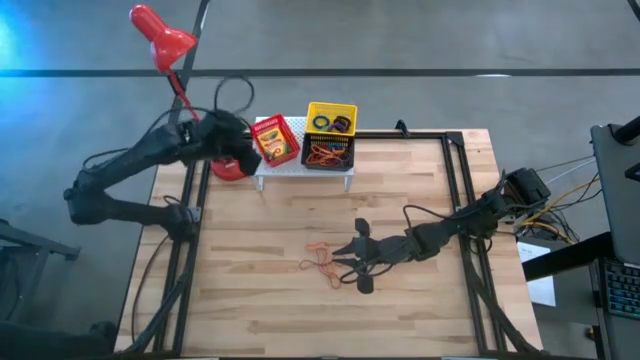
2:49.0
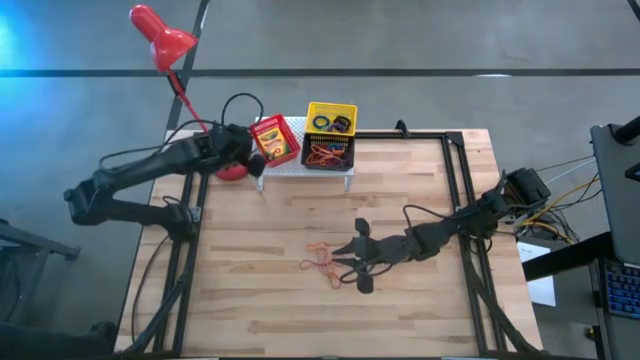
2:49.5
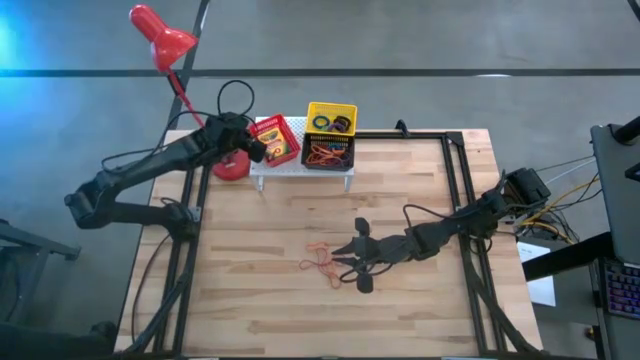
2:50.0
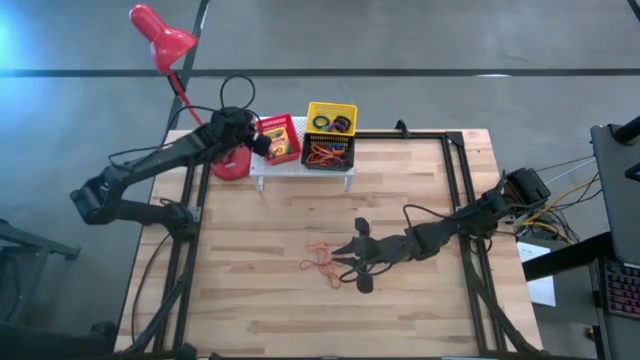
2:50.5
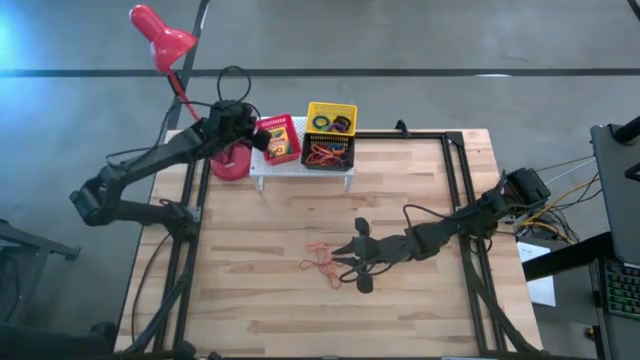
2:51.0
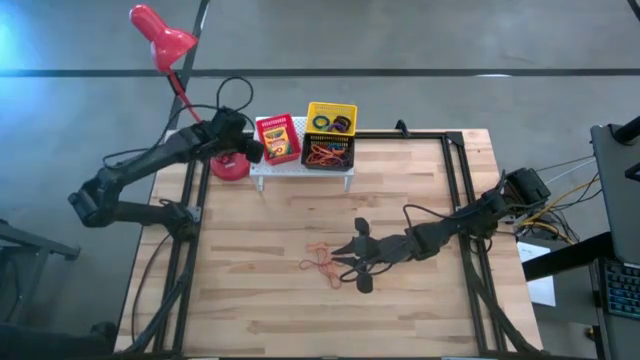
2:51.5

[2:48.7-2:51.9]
Task: Pick & Place Office Desk Supplies
Adjust the red bin on the shelf

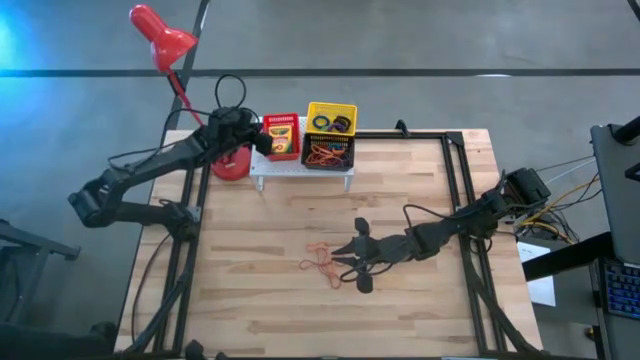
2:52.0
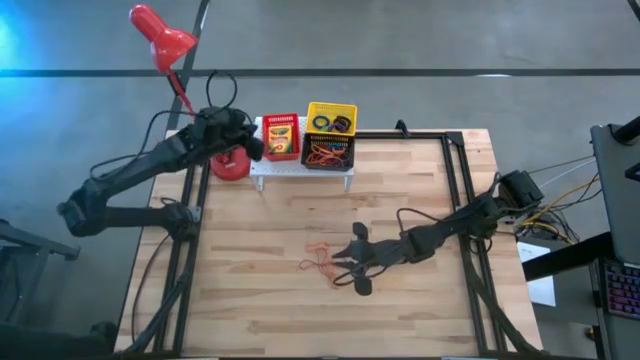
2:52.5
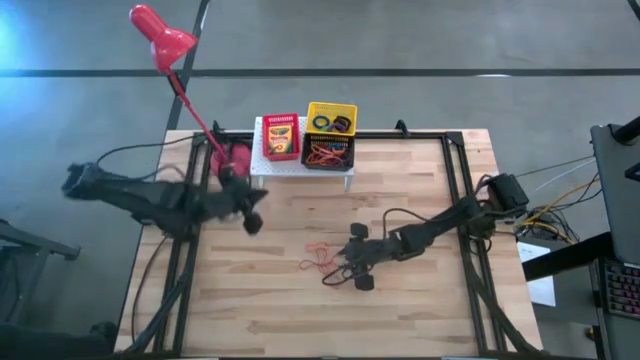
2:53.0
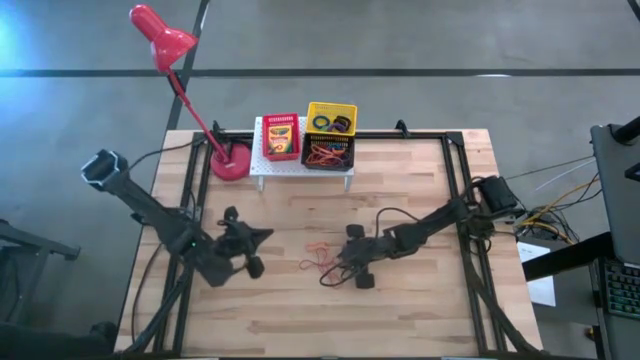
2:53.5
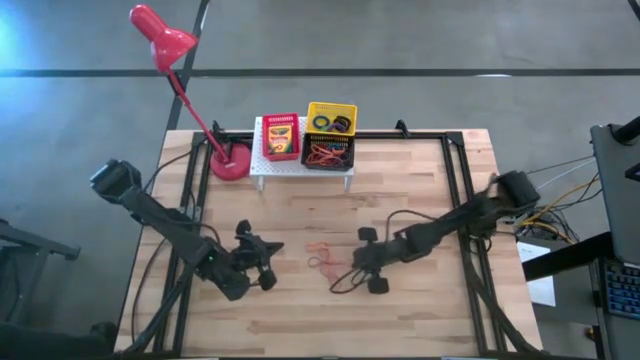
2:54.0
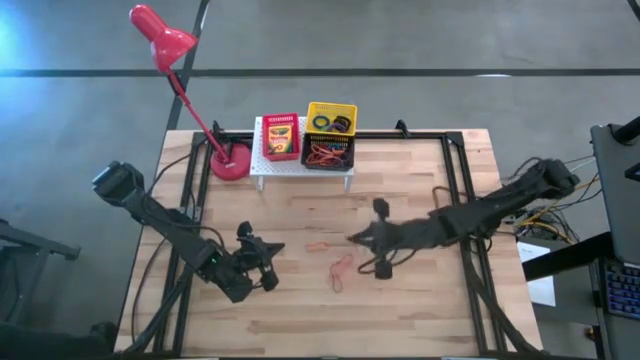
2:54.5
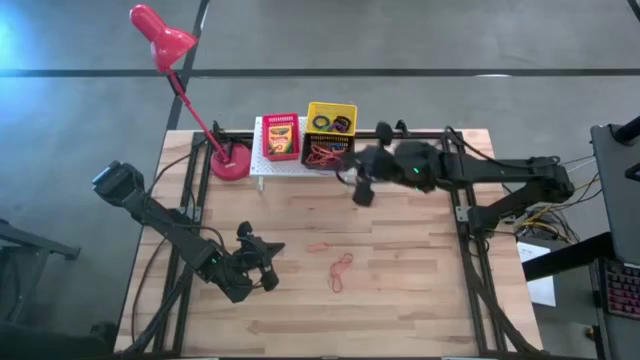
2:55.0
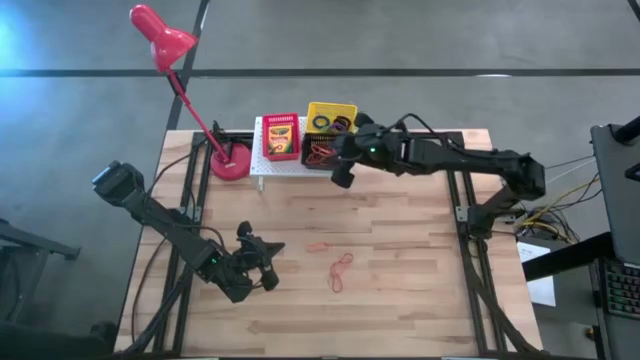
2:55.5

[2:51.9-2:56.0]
Put the red rubber band into the black bin on the shelf

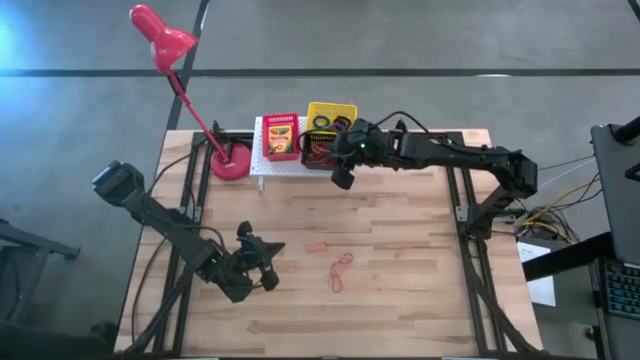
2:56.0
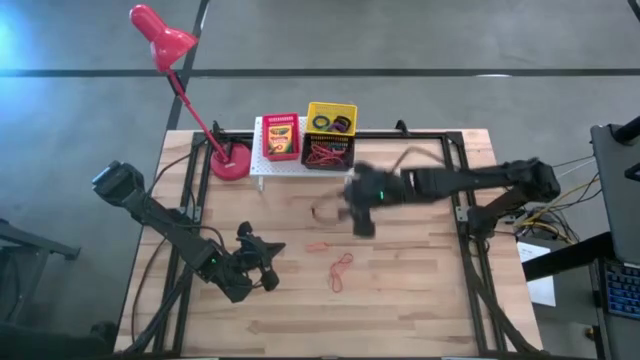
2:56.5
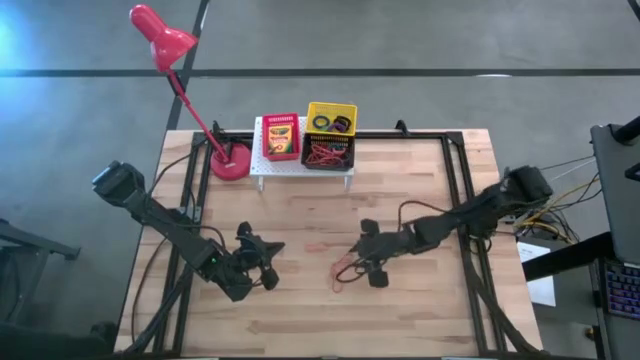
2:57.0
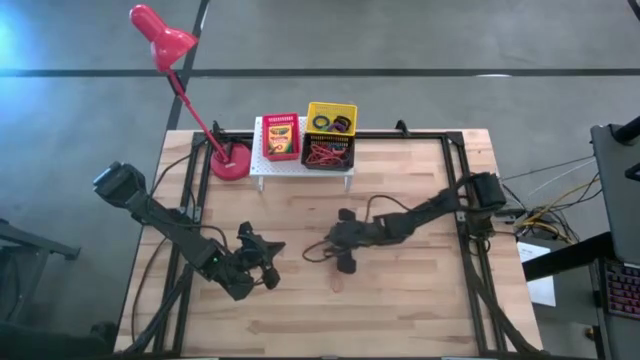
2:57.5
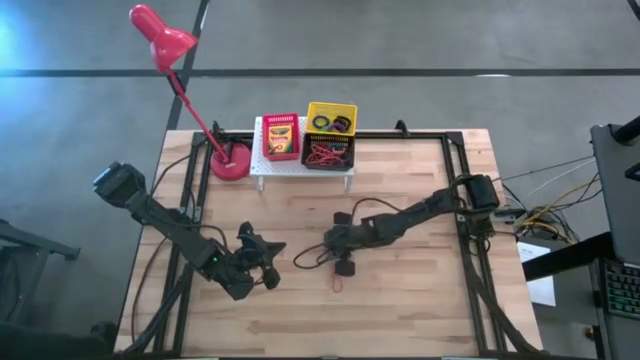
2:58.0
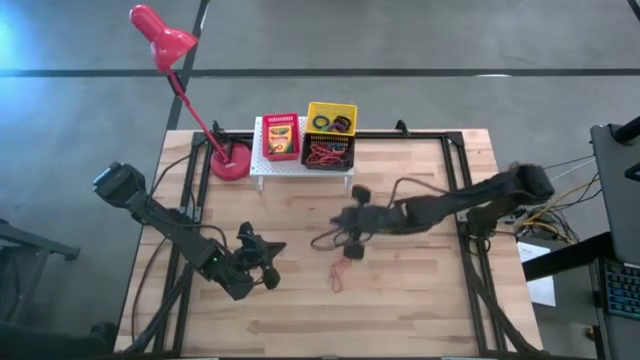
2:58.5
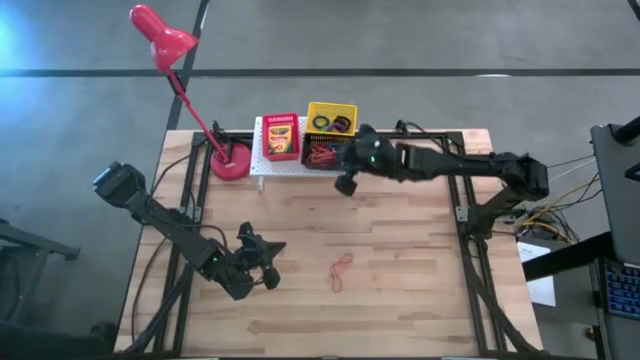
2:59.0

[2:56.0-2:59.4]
Put the orange rubber band into the black bin on the shelf

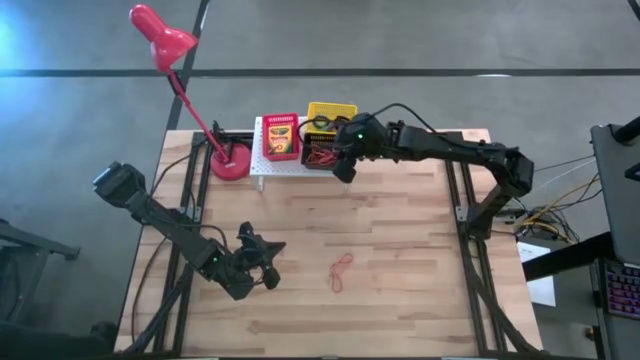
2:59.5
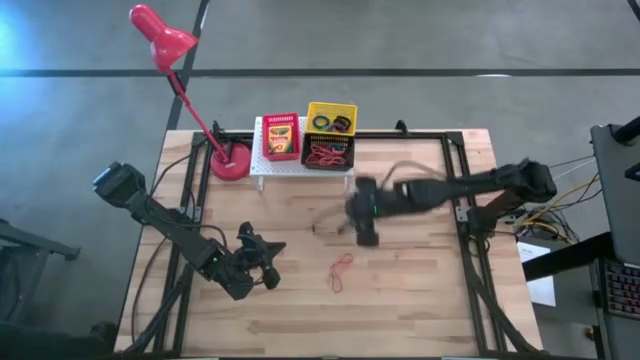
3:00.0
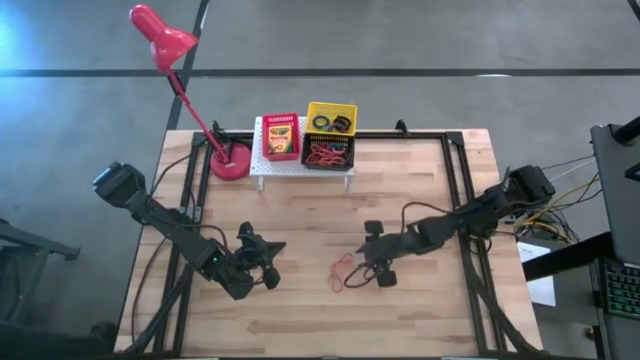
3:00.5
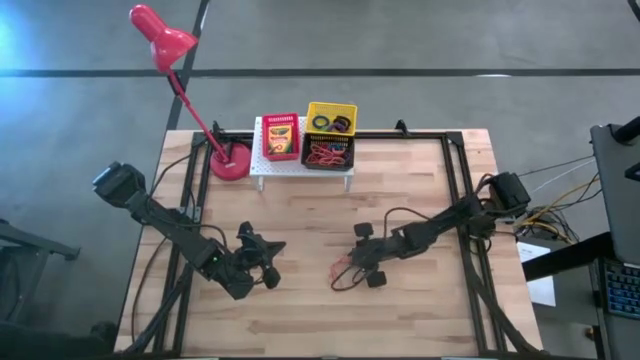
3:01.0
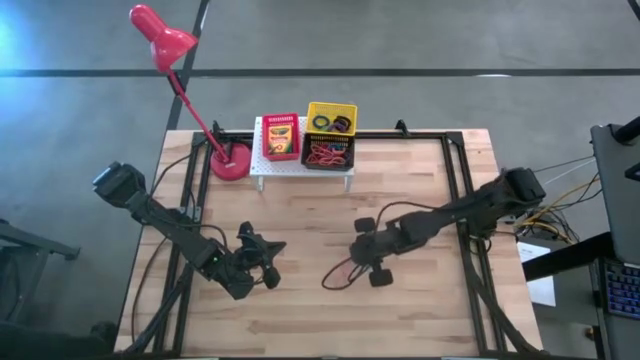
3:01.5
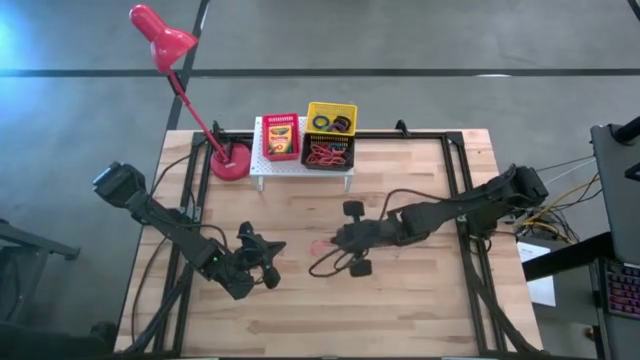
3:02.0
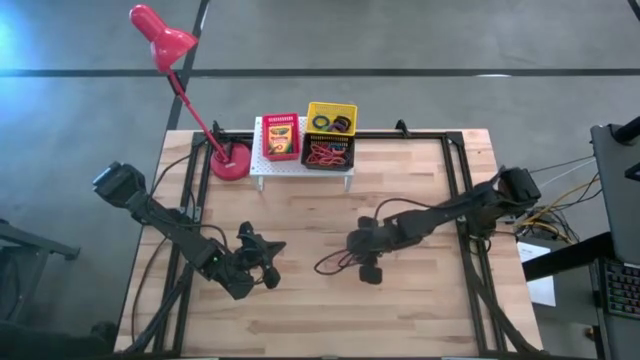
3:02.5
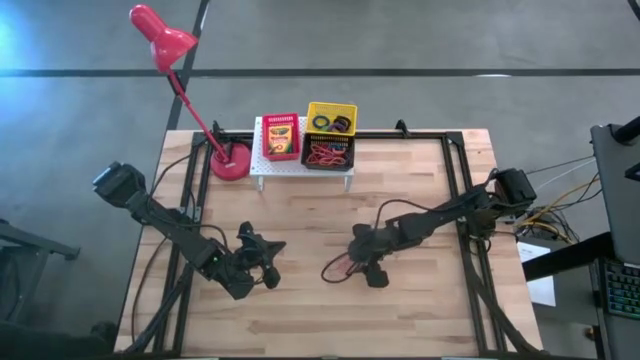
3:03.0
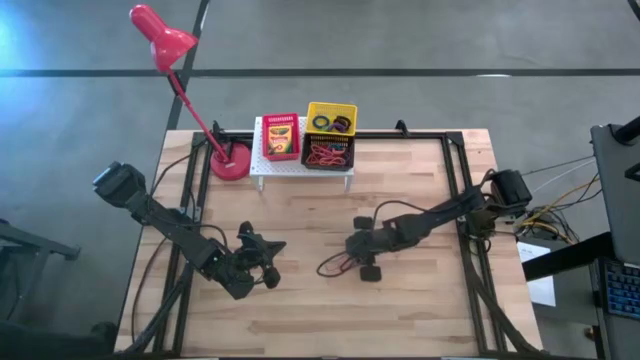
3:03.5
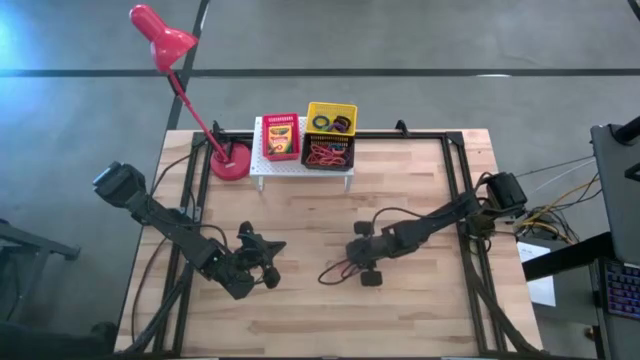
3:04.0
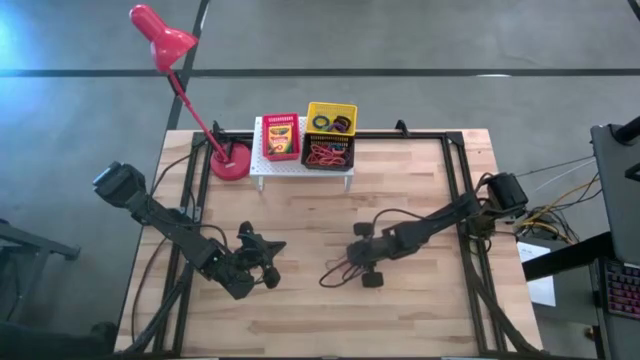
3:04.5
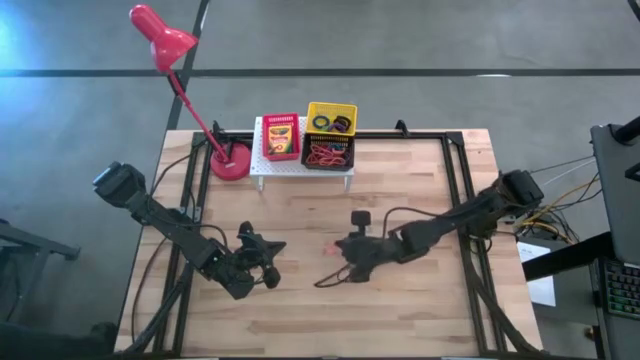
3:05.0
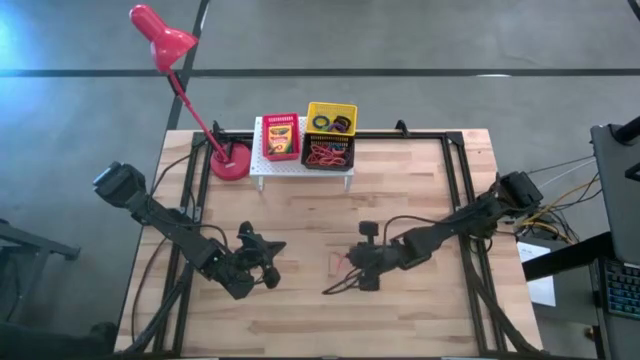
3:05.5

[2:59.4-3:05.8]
Put the orange rubber band into the black bin on the shelf

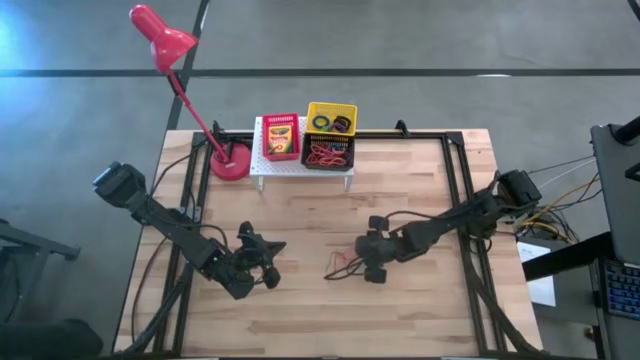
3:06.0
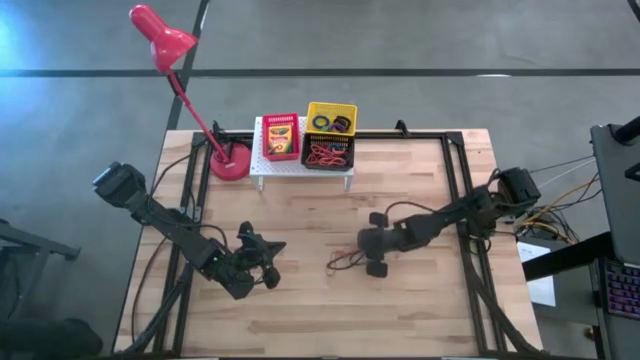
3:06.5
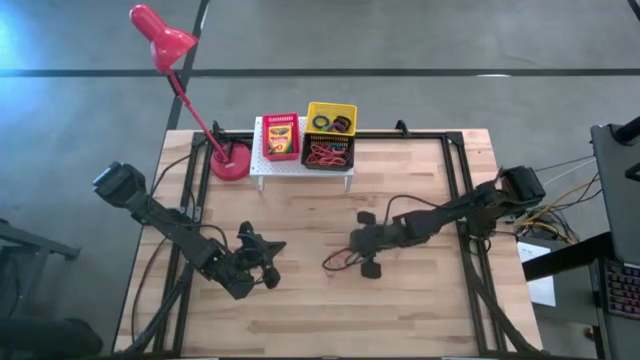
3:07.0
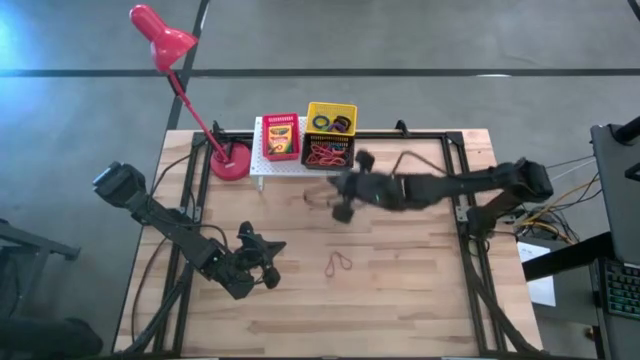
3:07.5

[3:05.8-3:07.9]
Put the orange rubber band into the black bin on the shelf

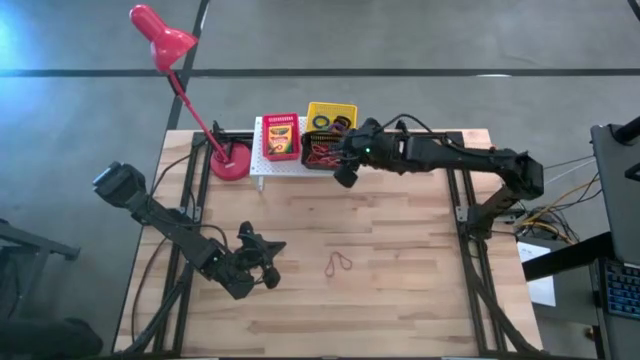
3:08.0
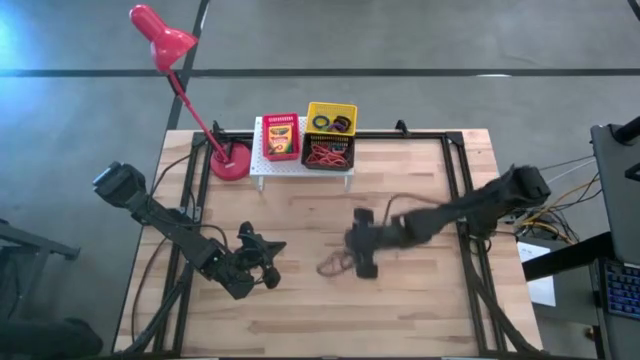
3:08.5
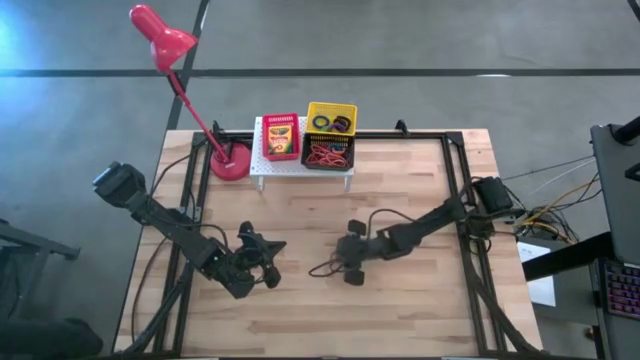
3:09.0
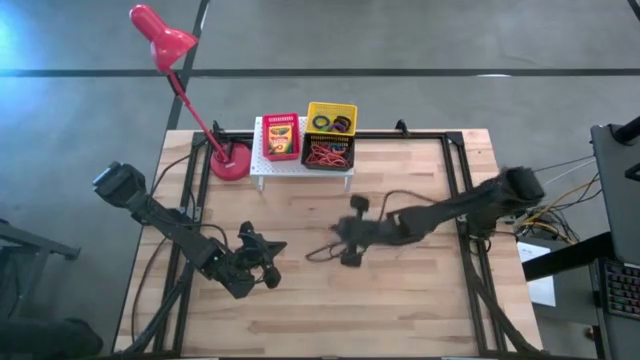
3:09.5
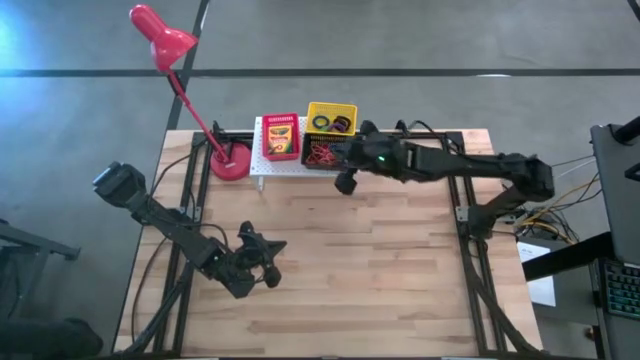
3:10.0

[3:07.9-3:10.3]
Put the red rubber band into the black bin on the shelf
